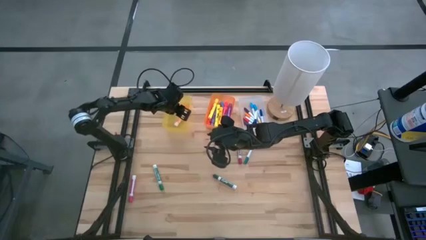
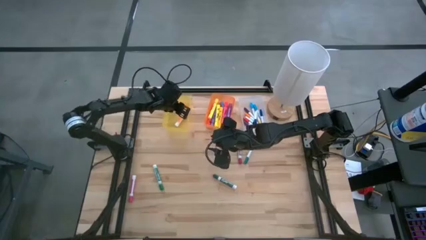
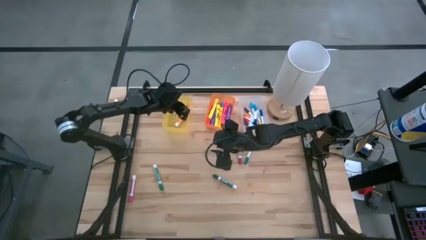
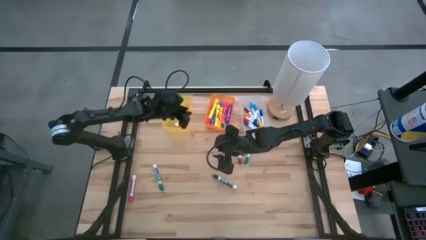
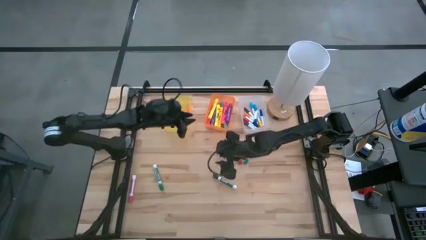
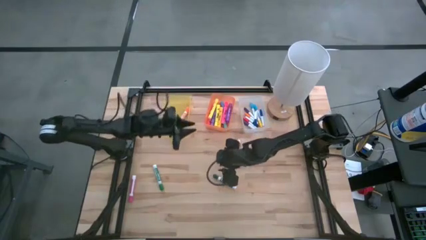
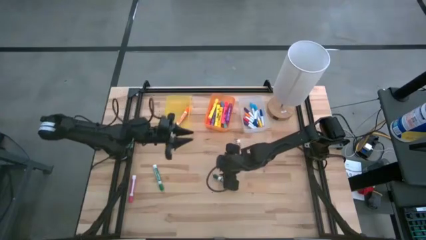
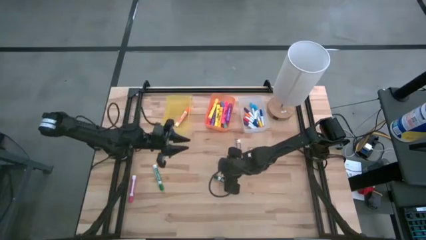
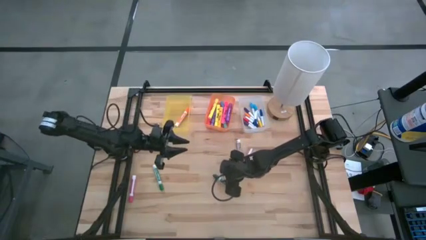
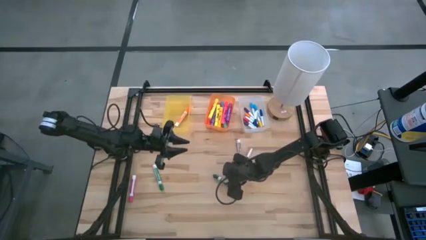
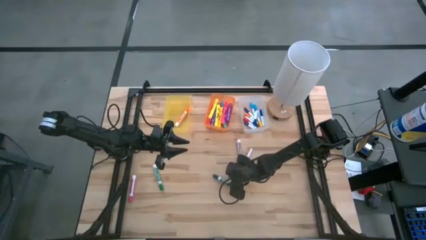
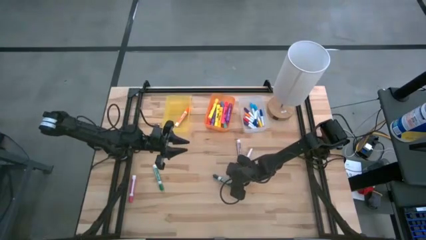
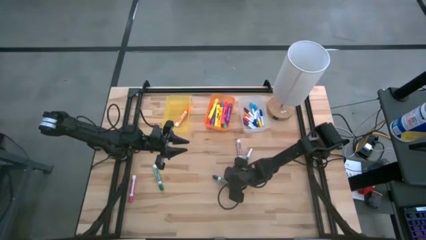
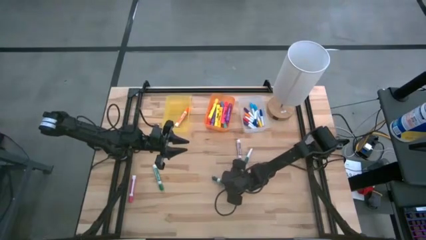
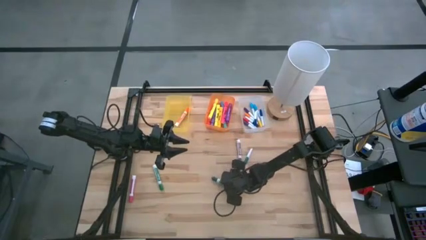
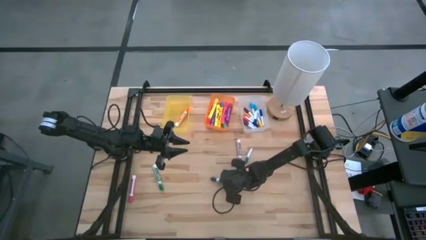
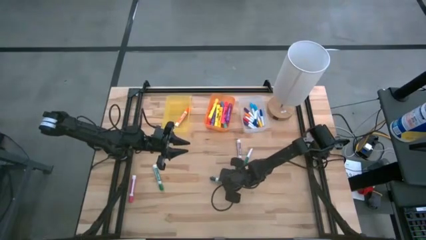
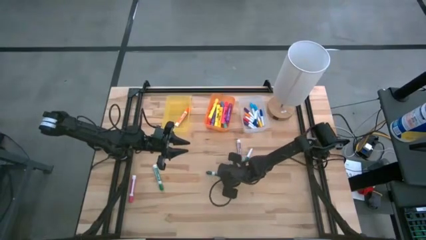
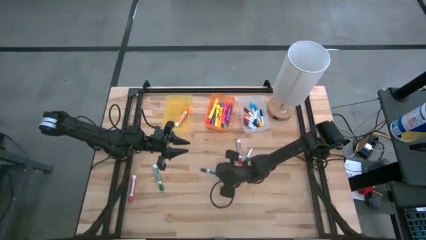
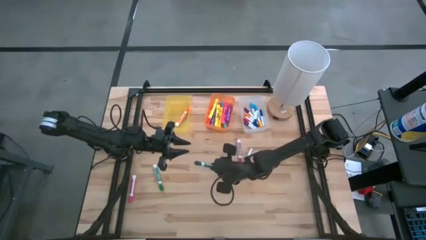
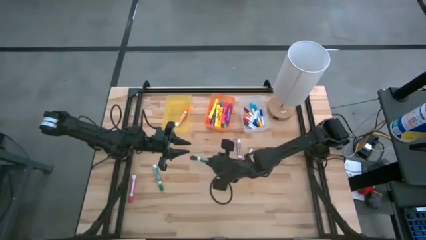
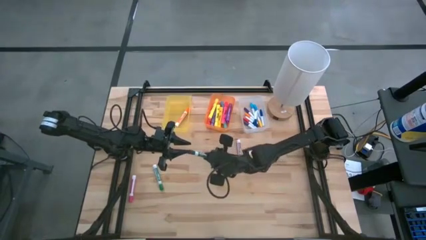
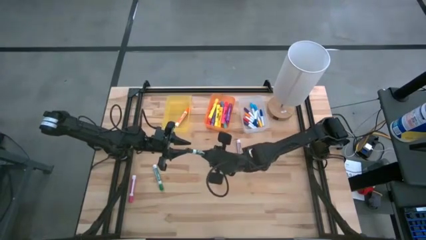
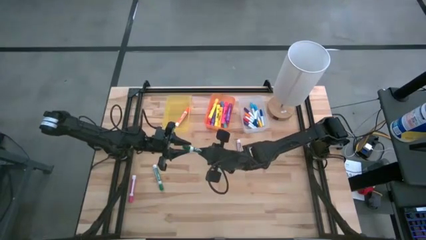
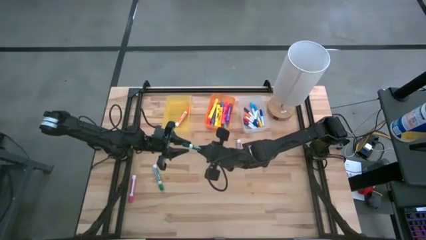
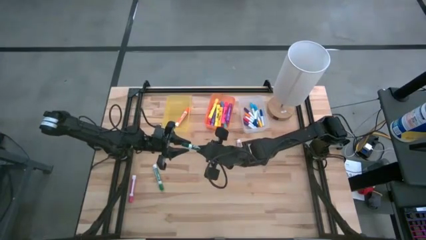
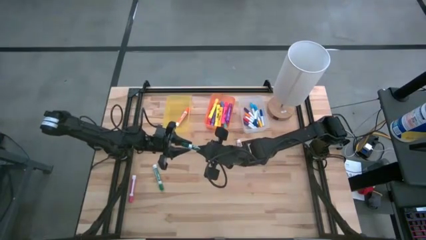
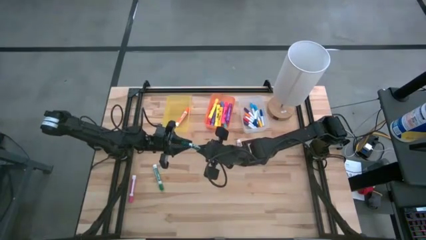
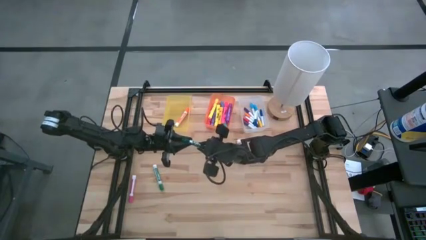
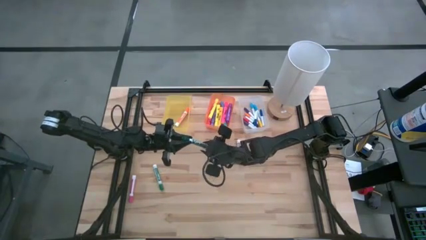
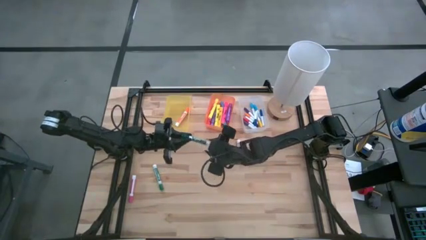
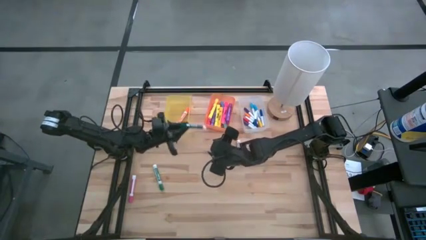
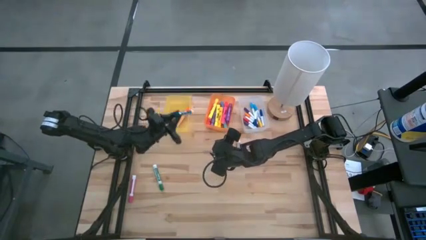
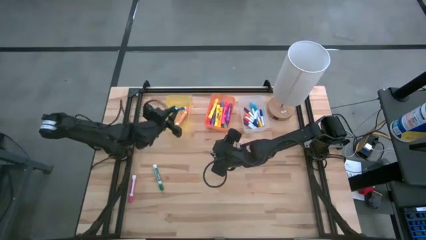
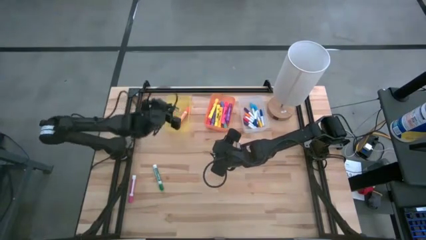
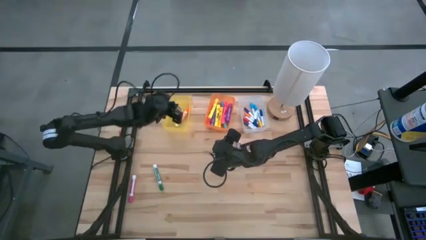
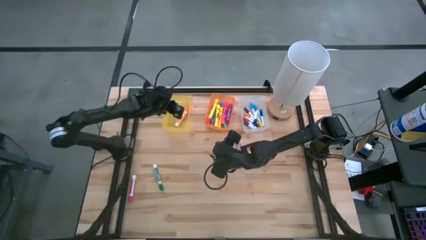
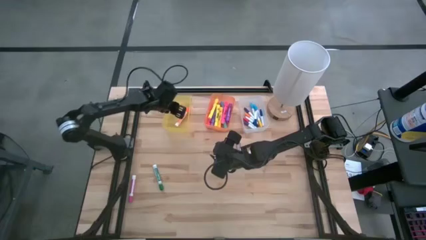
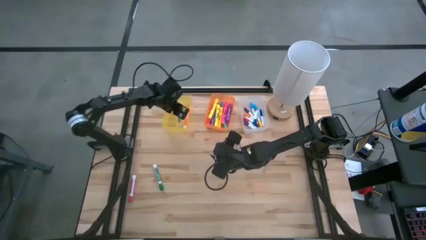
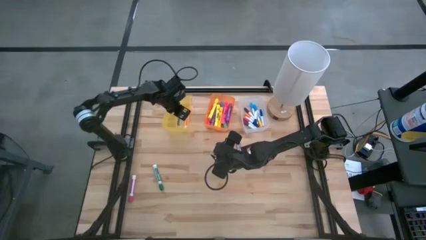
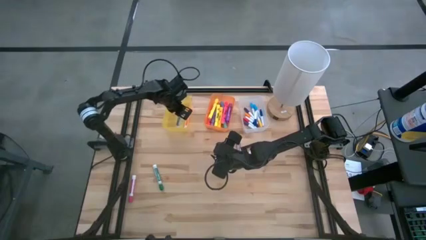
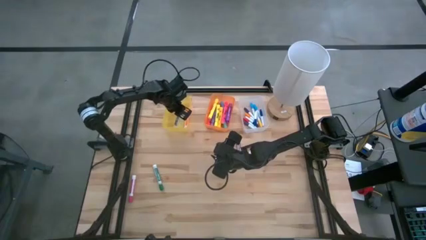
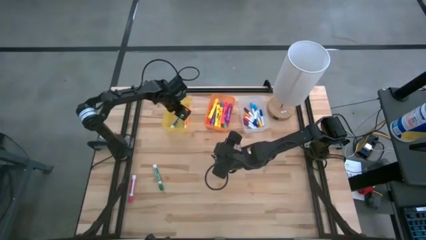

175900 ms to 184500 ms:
Task: Pick & Place Markers
Put the dark green expo dry erase marker into the yellow bin

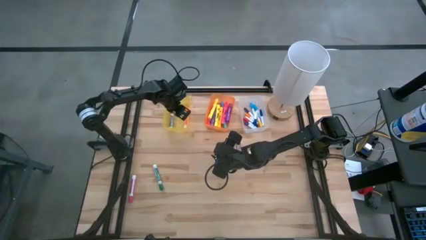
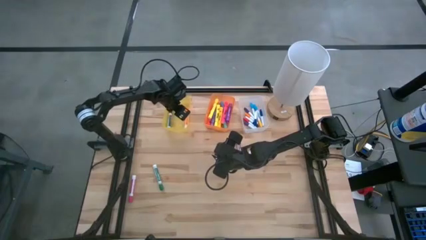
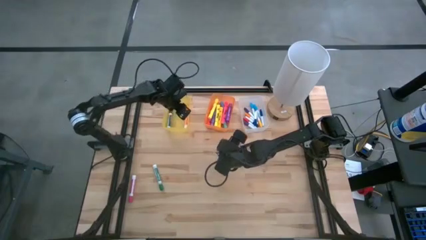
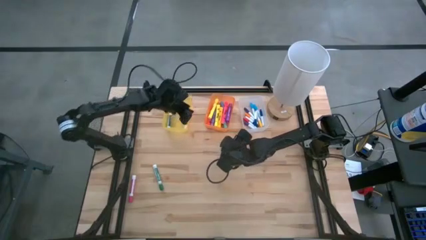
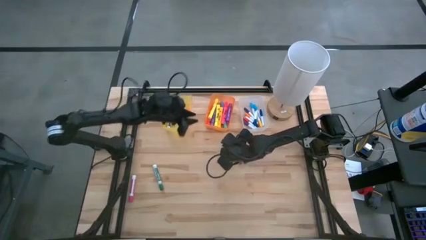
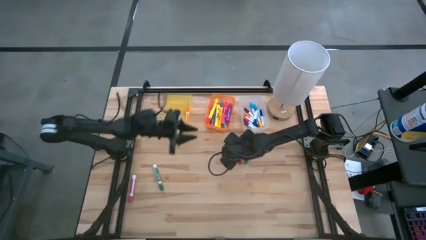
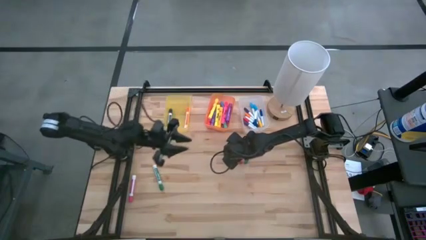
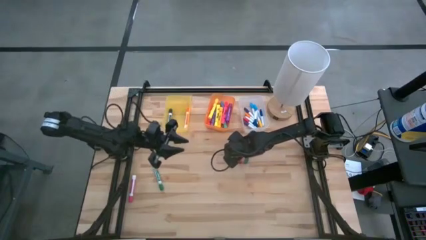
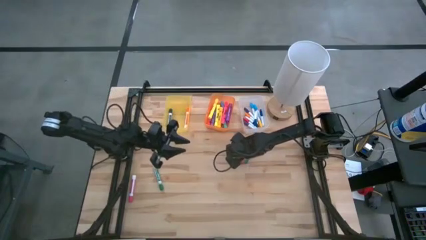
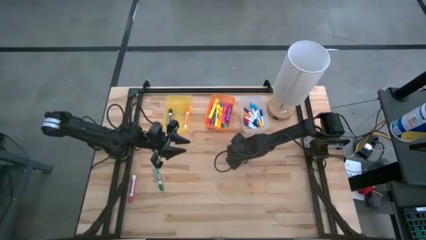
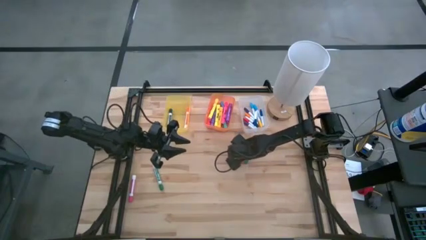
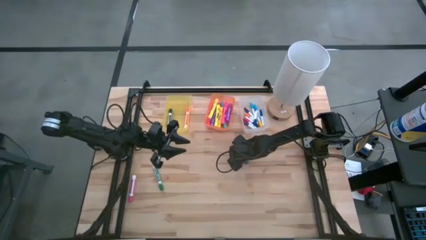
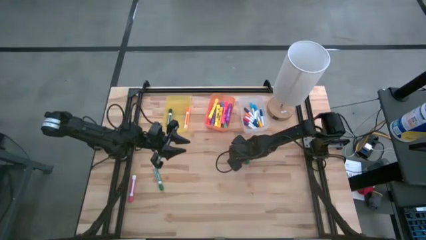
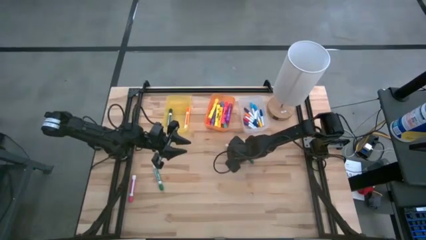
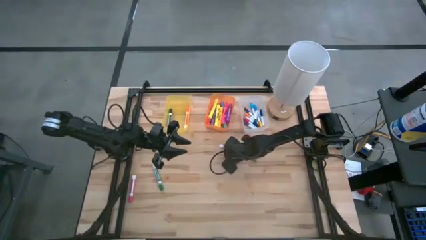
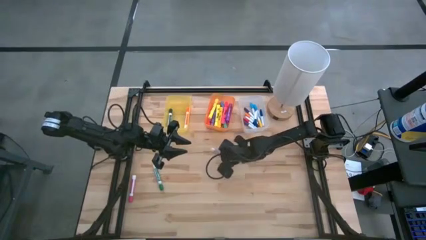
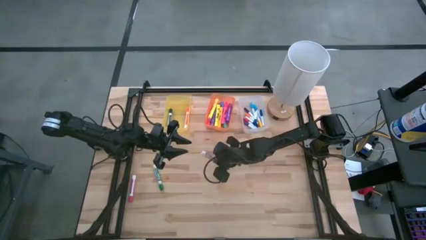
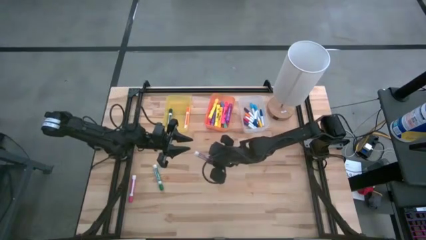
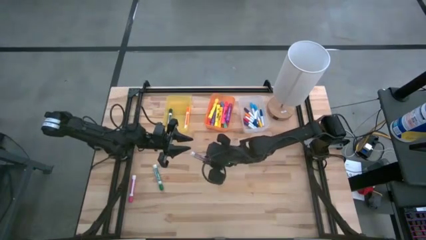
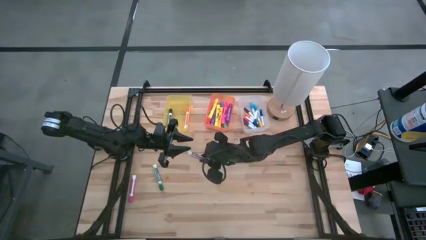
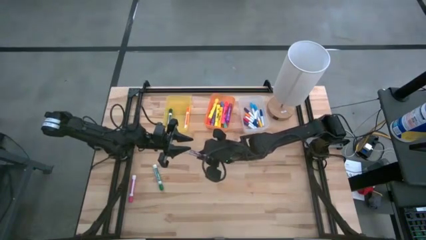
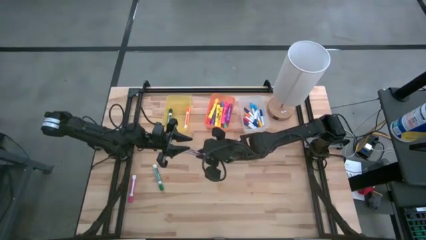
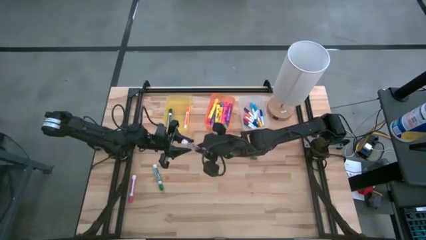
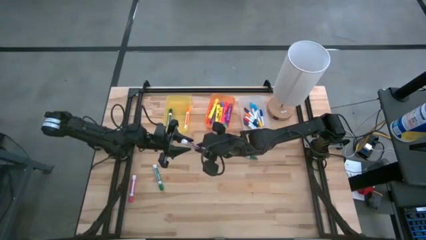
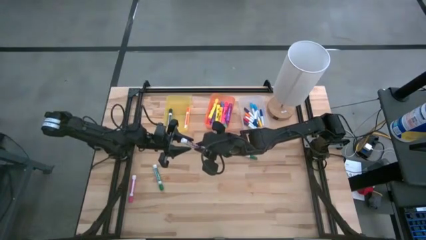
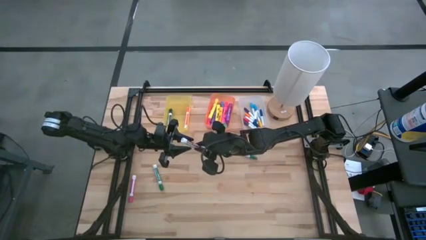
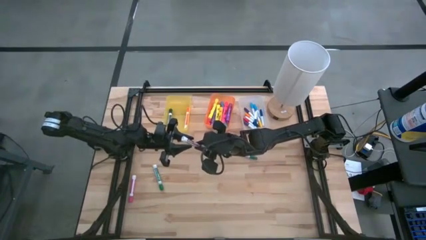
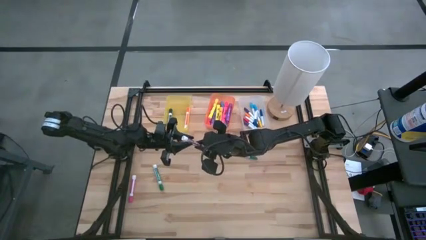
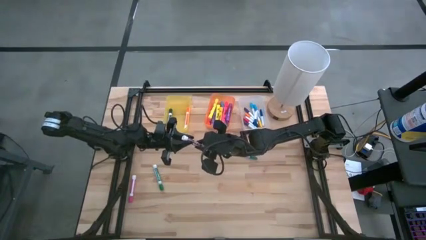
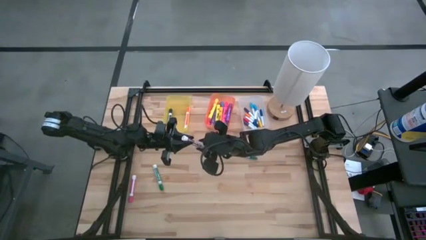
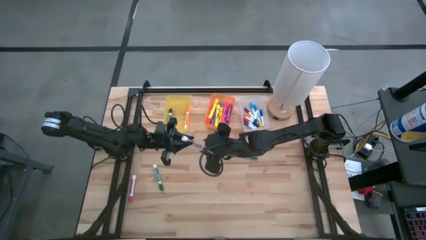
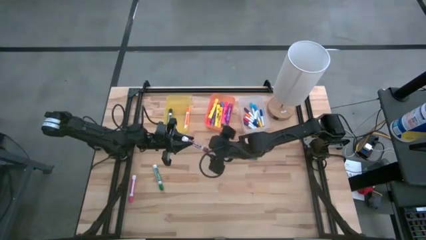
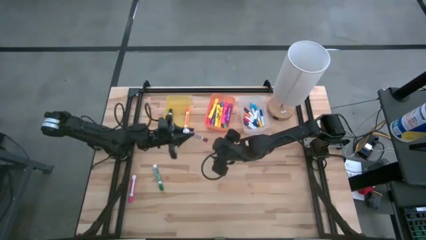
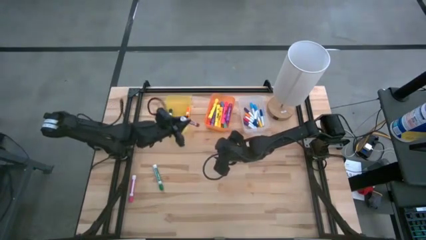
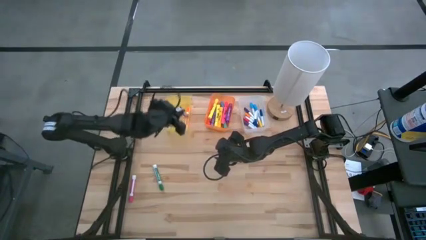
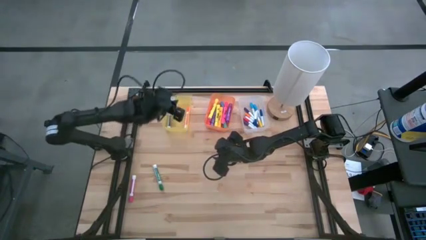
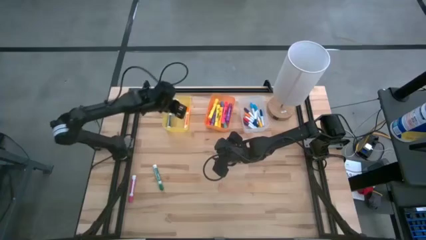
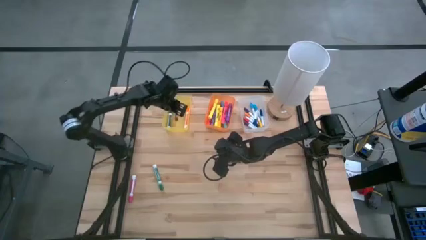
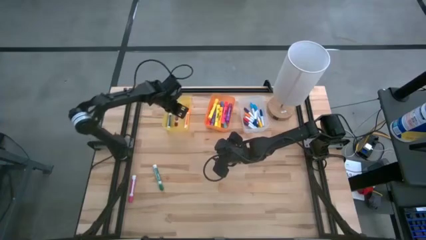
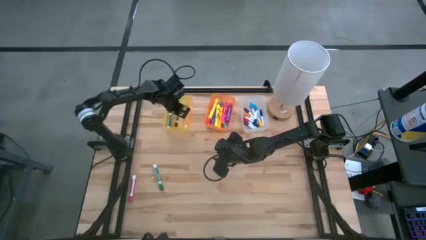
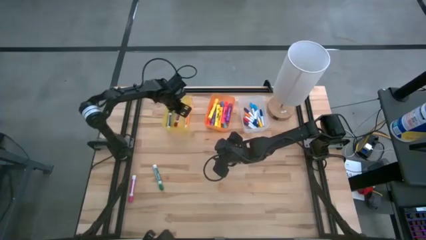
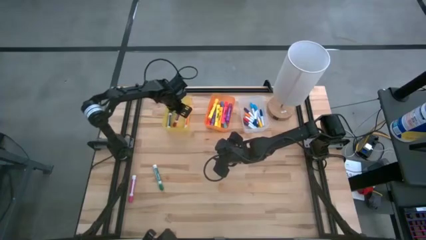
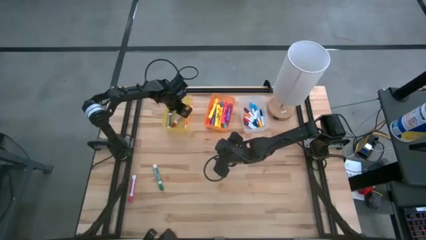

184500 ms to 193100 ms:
Put the red expo dry erase marker into the yellow bin

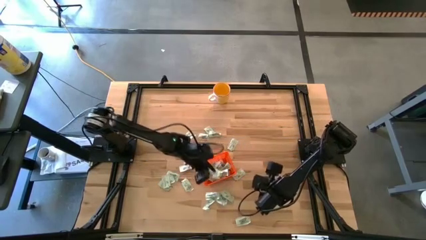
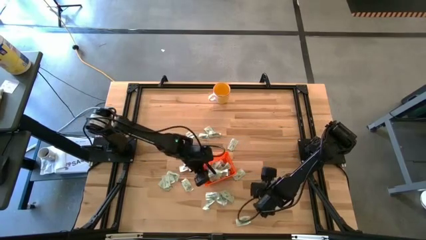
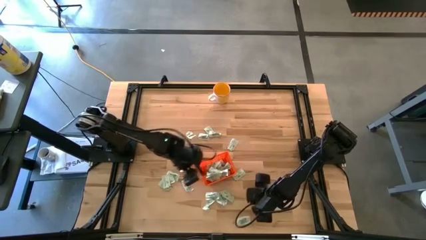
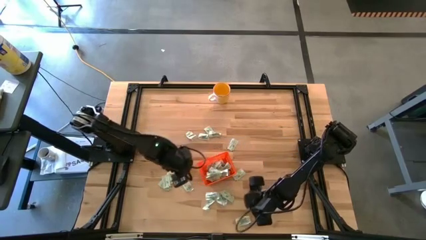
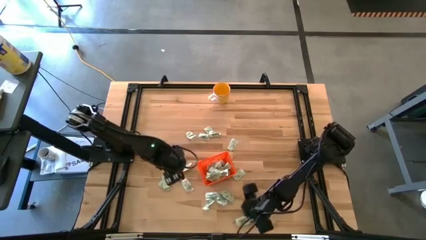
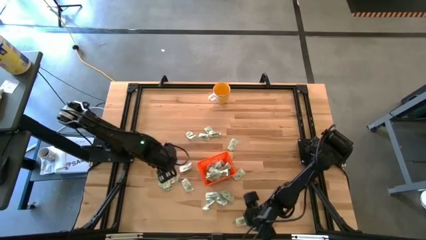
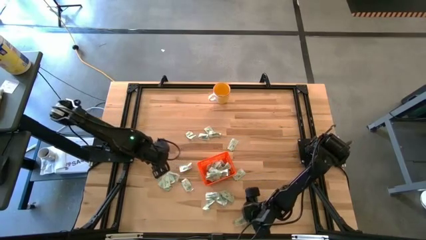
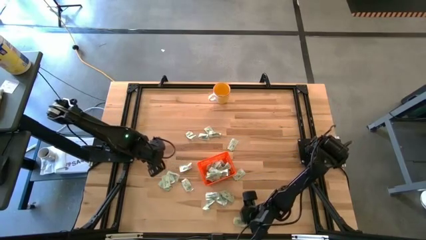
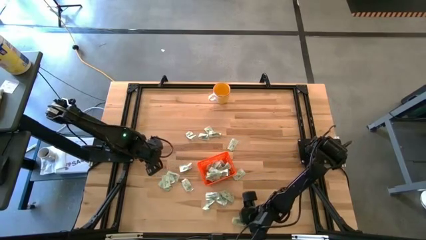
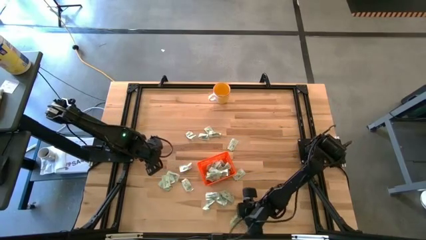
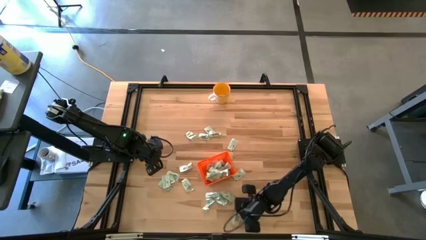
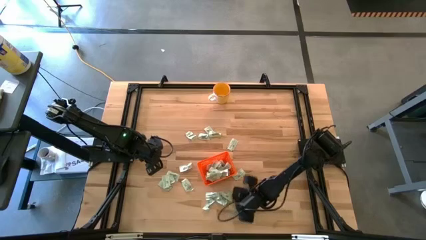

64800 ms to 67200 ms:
Task: Pick and place Stevia / Truvia into bins
Put the stevia packet into the bin
